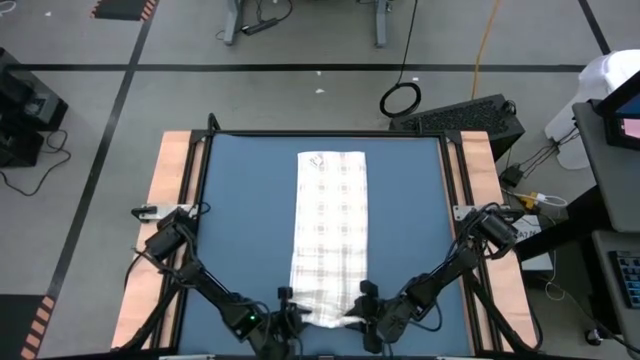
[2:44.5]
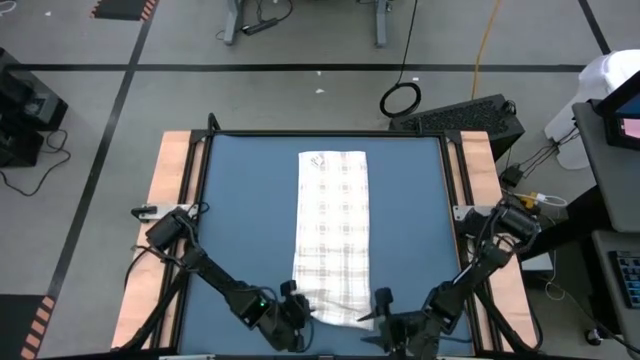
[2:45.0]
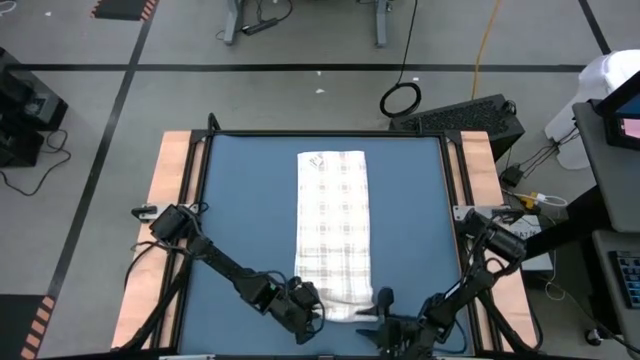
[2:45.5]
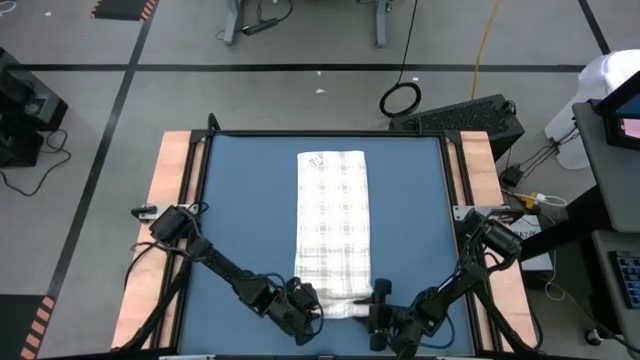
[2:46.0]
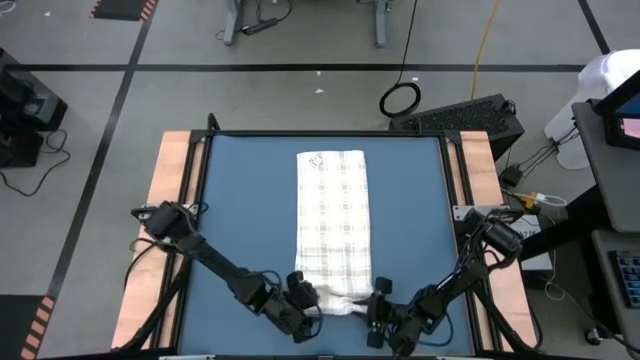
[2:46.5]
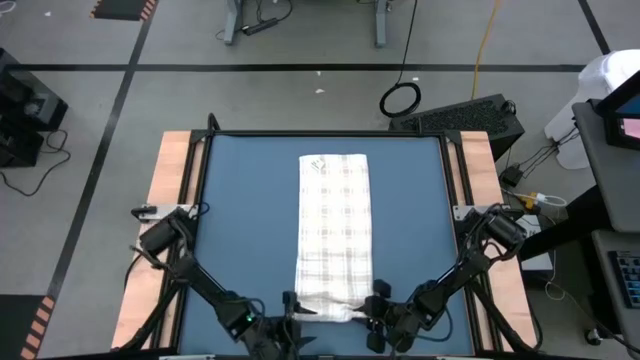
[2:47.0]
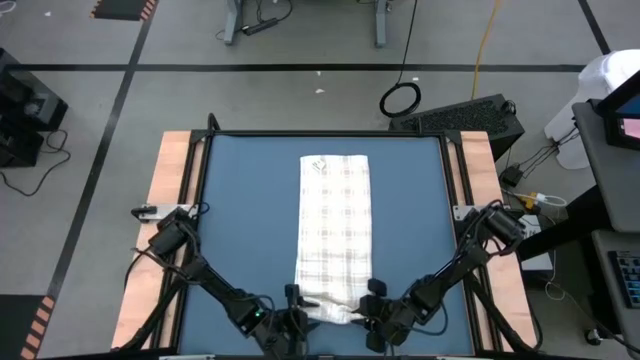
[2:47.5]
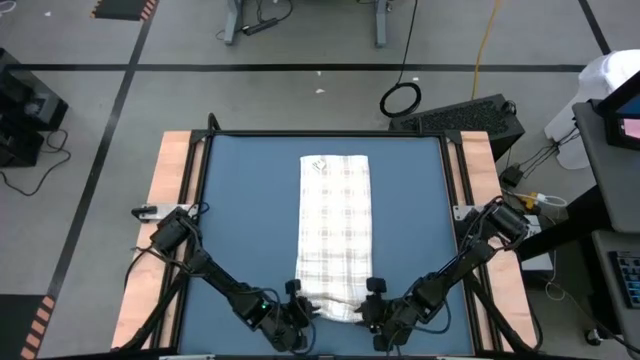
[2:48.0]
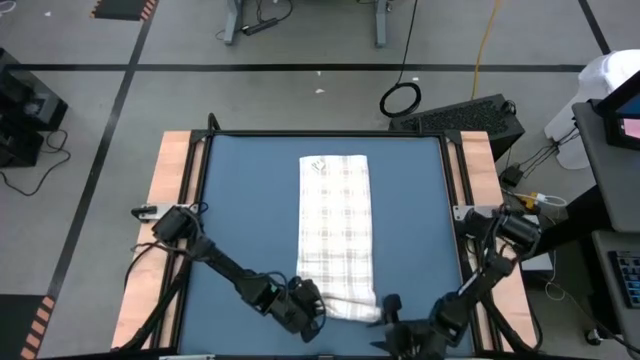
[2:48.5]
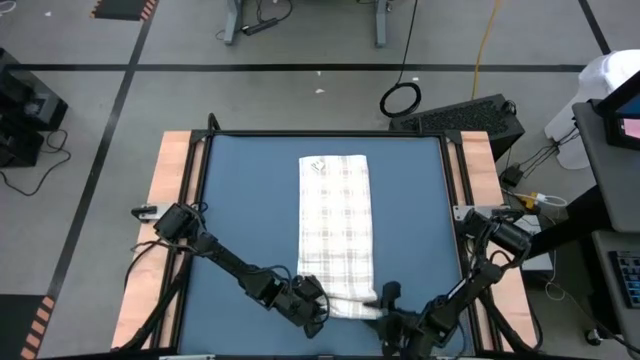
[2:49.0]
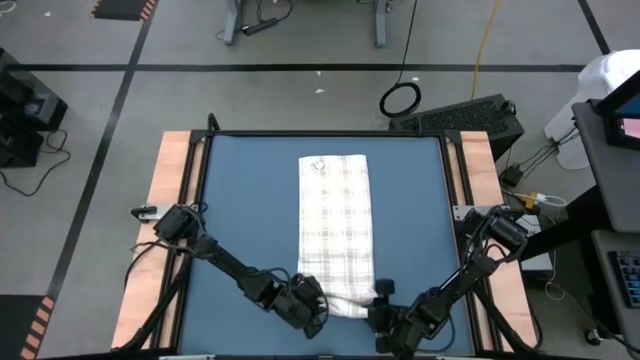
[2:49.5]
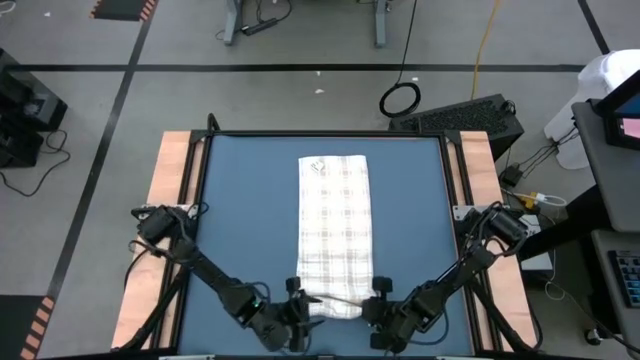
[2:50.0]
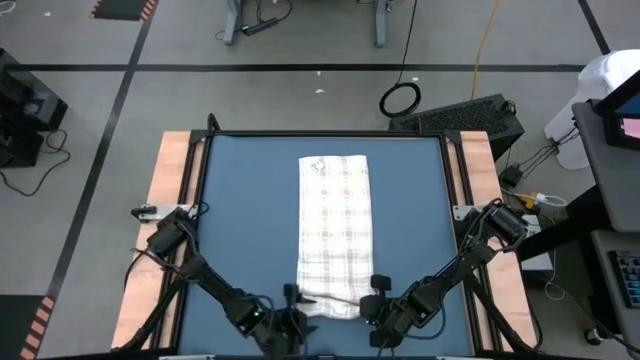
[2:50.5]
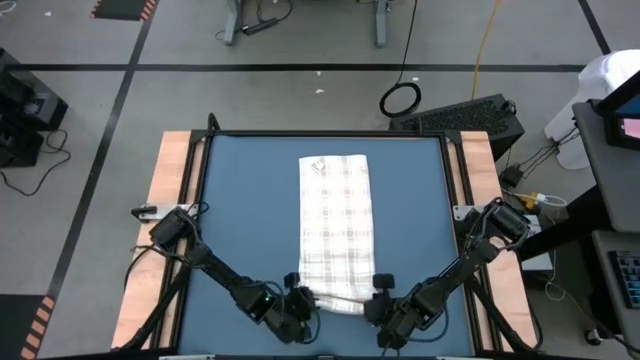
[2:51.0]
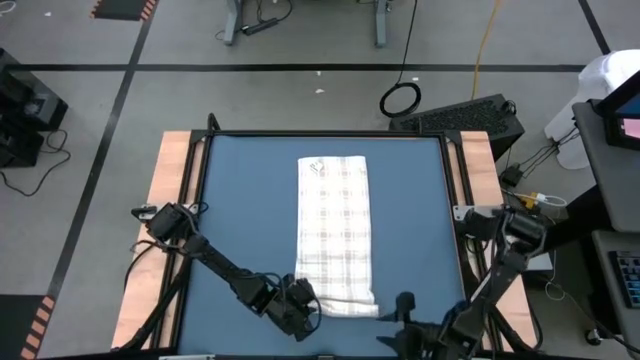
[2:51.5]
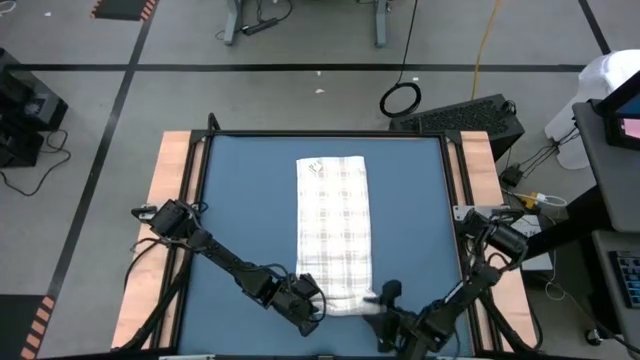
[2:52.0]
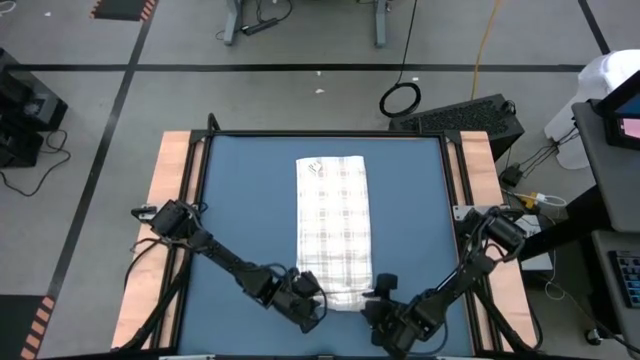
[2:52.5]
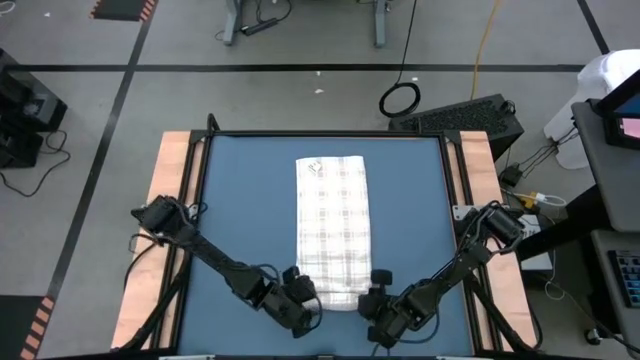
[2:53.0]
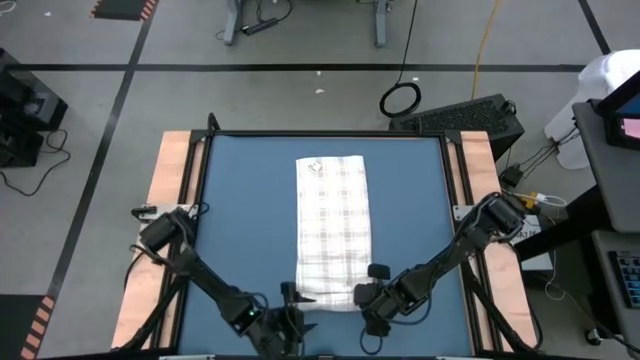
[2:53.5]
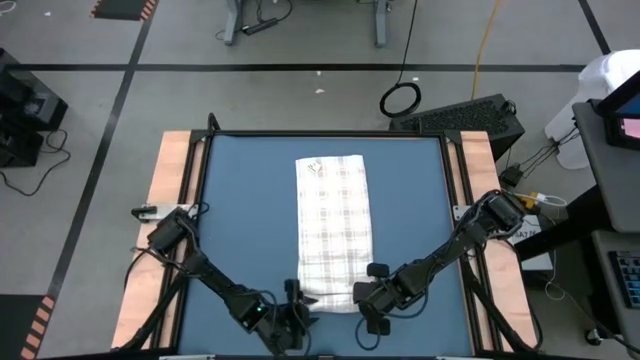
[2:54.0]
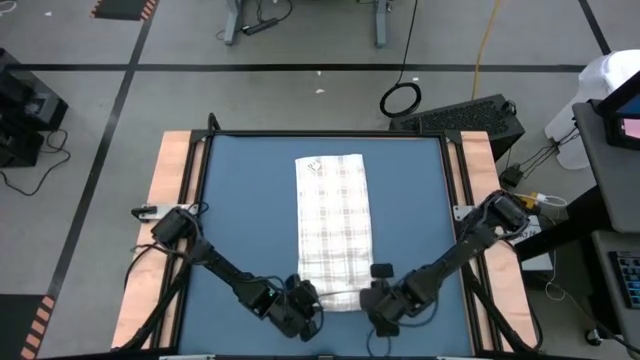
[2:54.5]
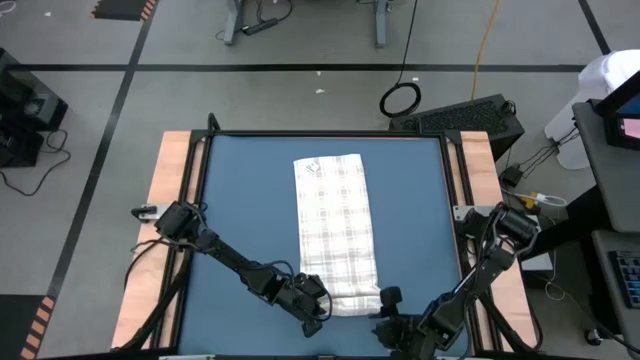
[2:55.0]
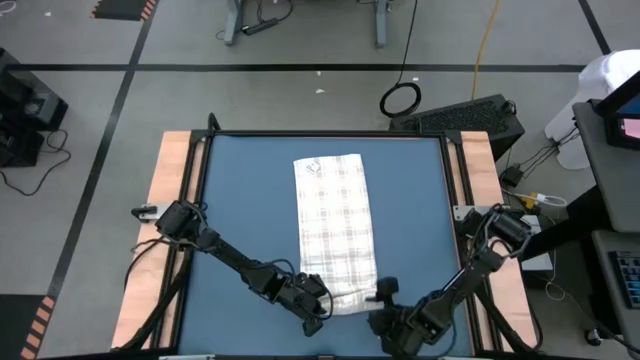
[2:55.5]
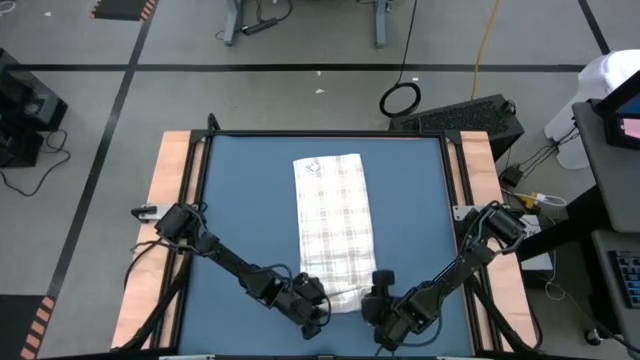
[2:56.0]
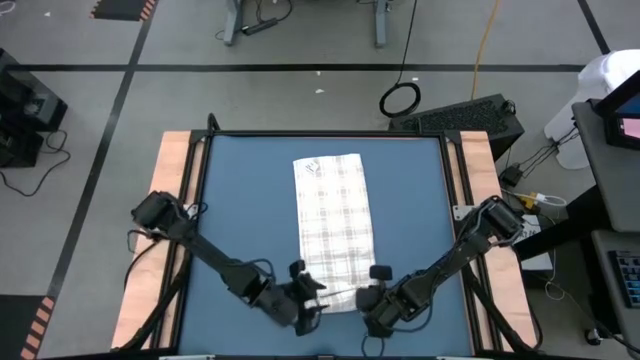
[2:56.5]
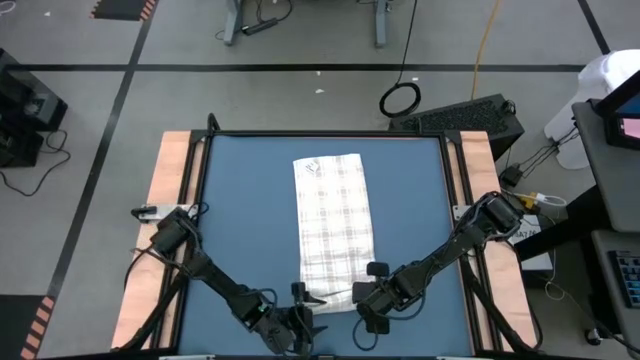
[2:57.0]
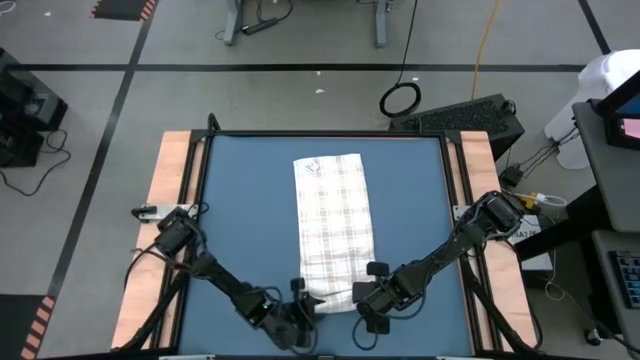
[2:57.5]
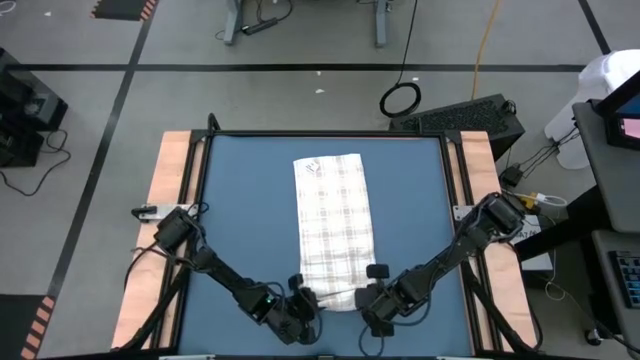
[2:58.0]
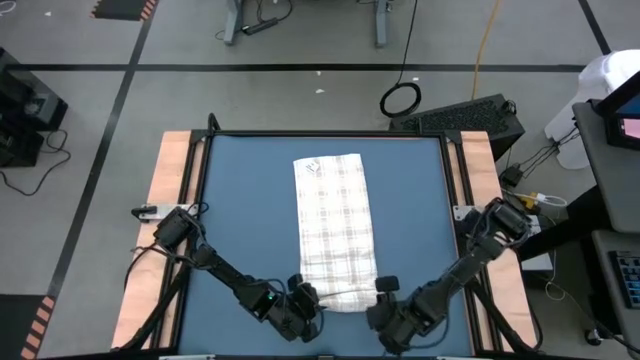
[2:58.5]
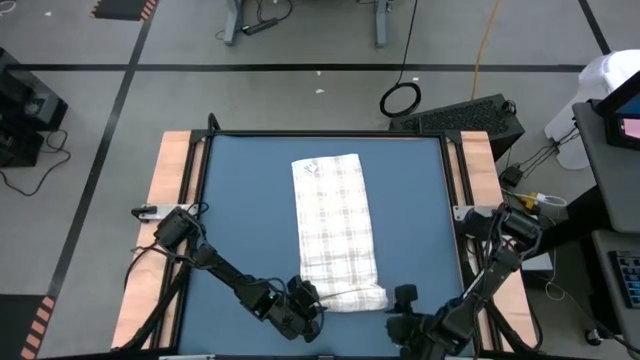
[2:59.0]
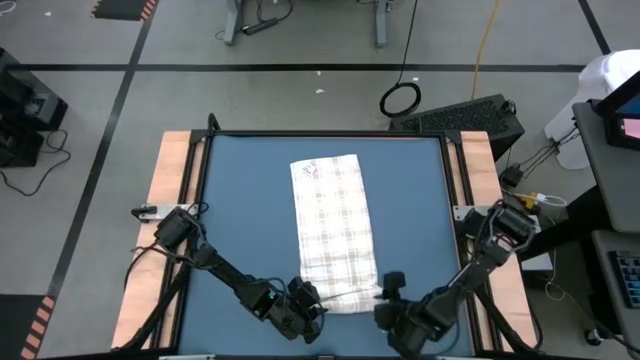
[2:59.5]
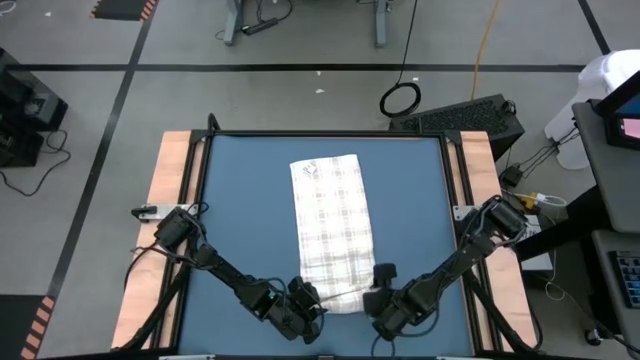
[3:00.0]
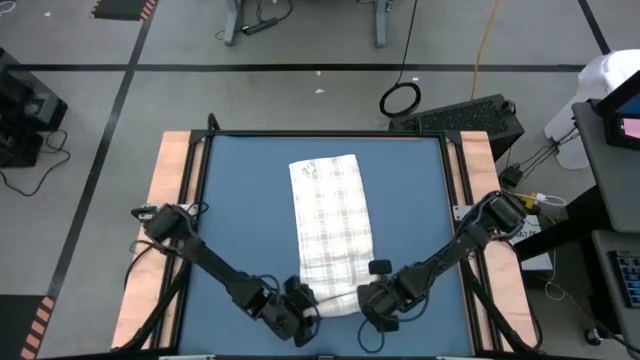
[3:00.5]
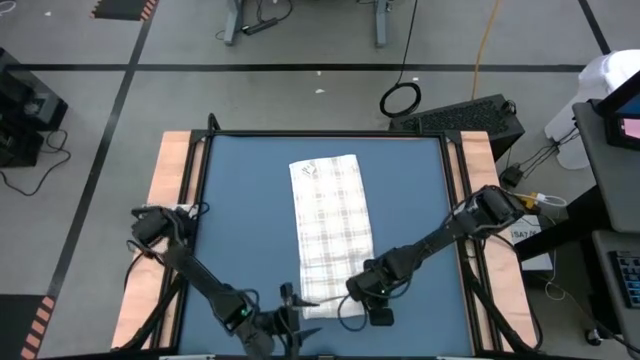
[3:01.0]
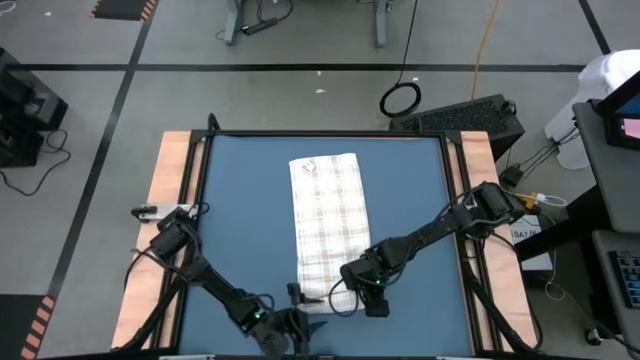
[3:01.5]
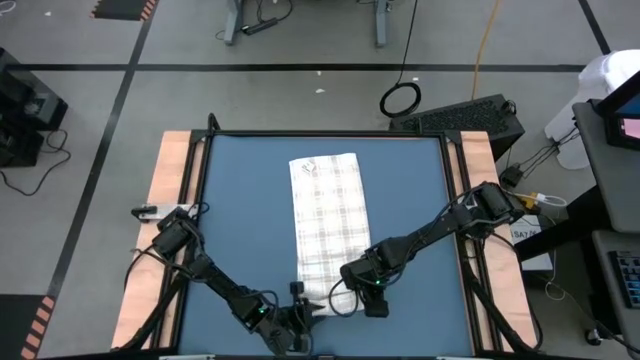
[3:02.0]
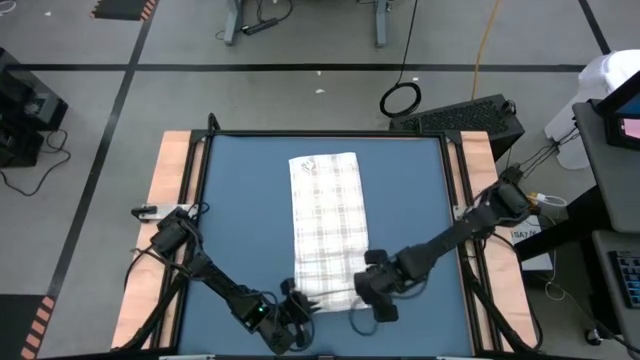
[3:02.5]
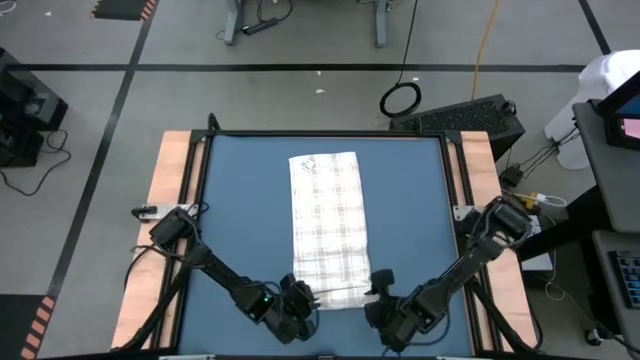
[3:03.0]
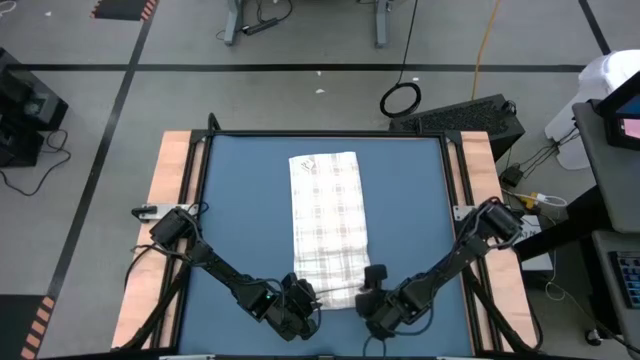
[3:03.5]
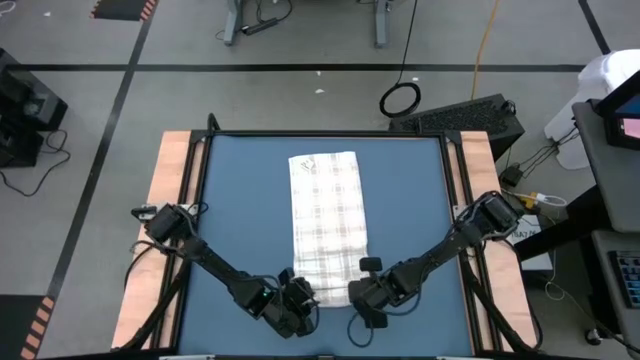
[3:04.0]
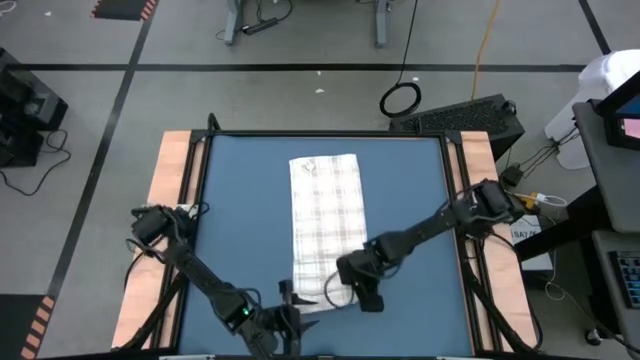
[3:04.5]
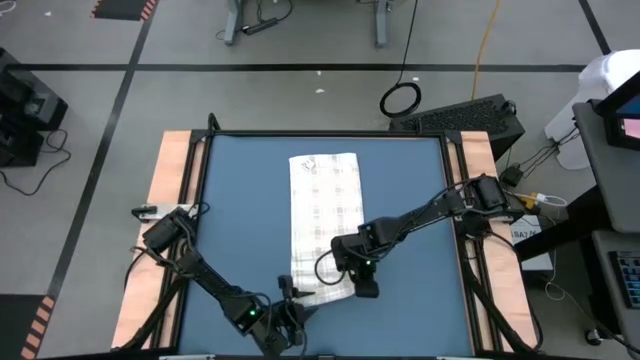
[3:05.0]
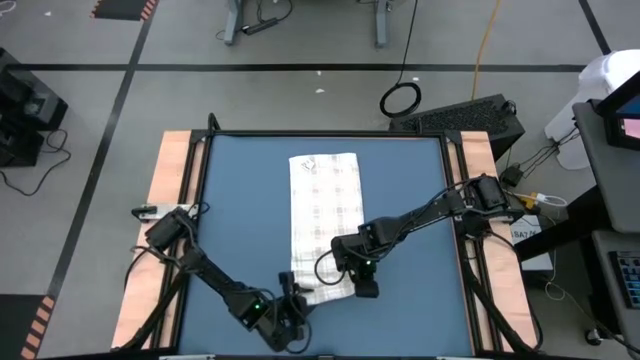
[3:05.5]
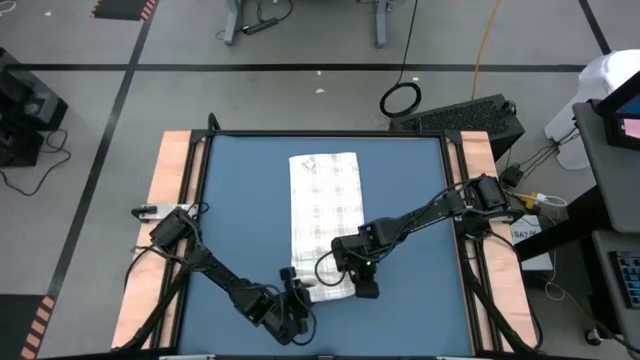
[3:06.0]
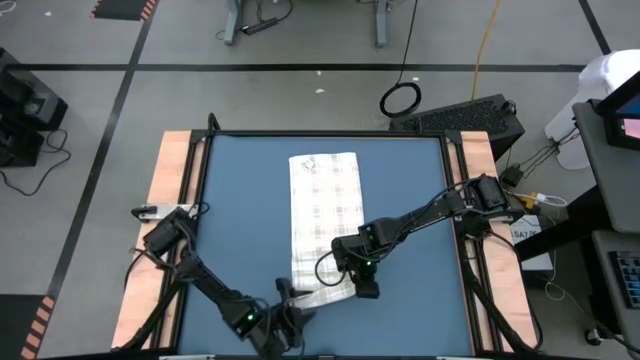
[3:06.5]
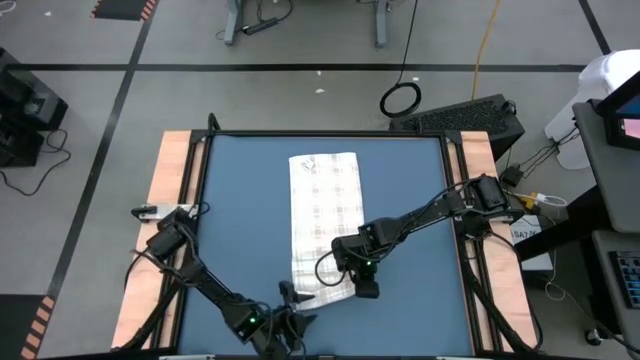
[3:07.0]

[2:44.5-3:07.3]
Task: Roll towel into tight, uniform cylinder
Roll the white towel
